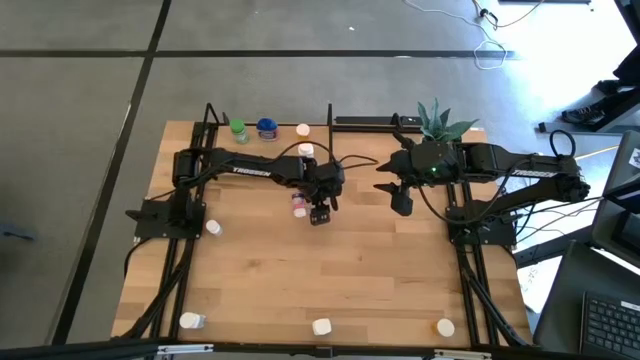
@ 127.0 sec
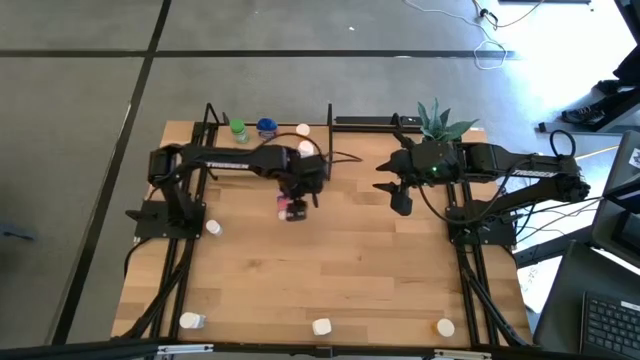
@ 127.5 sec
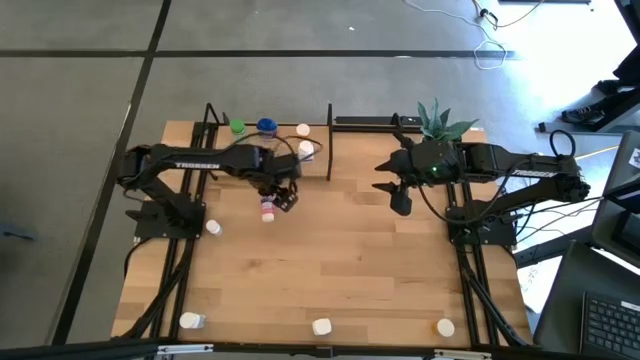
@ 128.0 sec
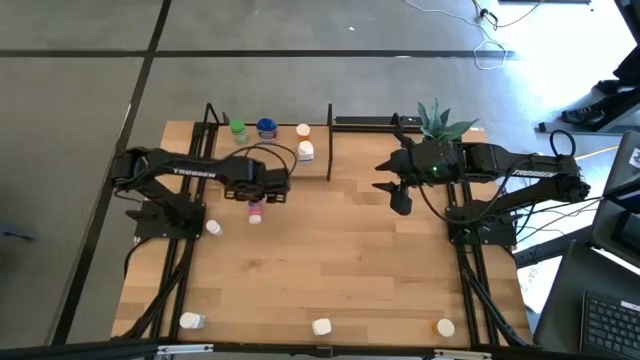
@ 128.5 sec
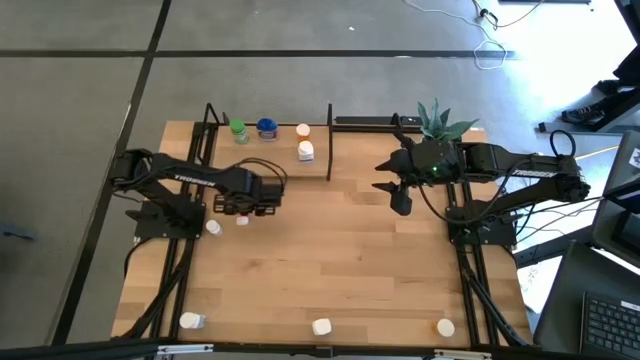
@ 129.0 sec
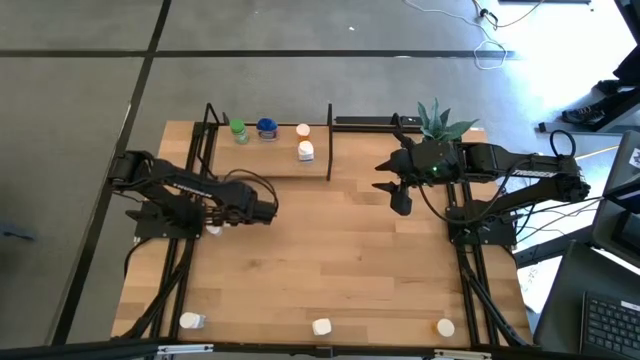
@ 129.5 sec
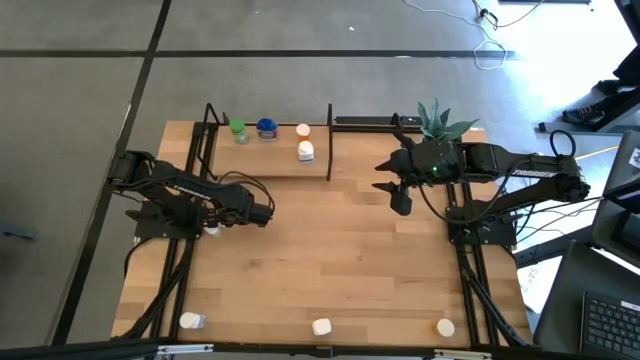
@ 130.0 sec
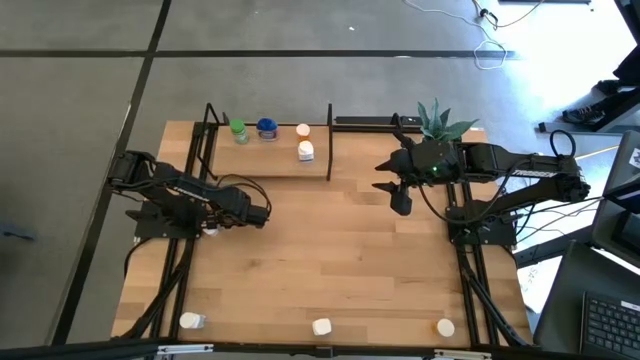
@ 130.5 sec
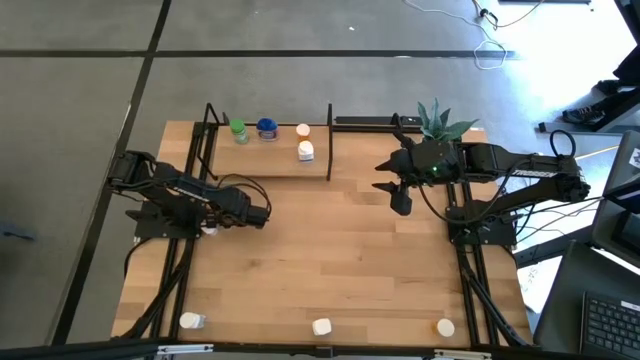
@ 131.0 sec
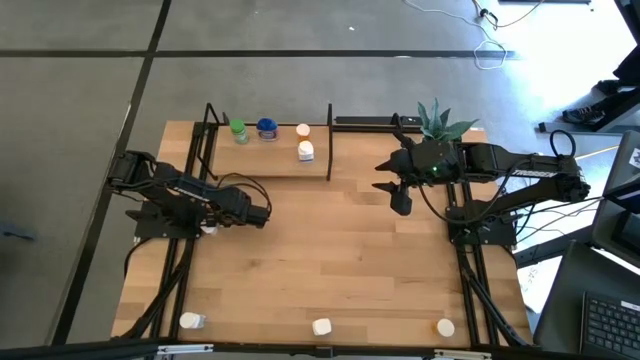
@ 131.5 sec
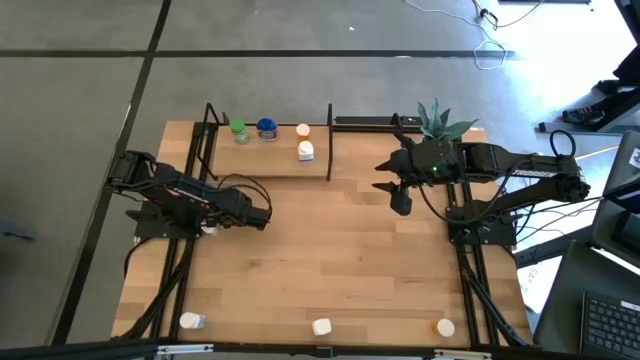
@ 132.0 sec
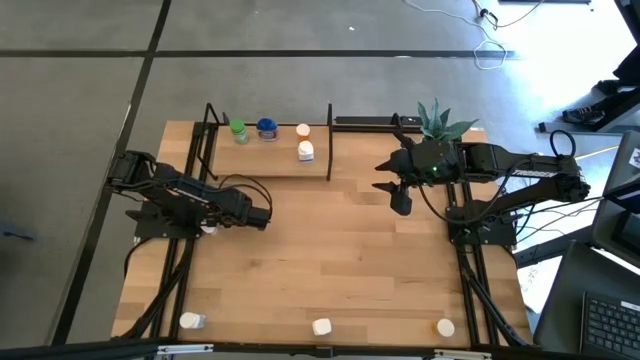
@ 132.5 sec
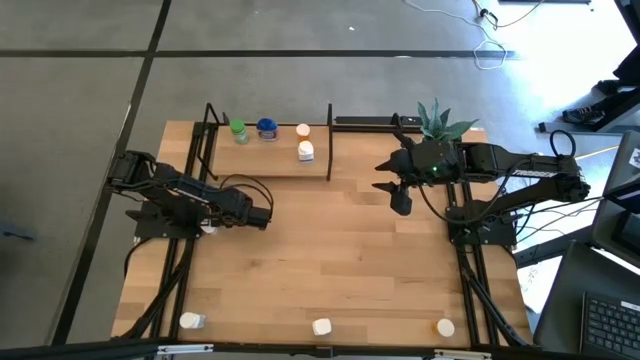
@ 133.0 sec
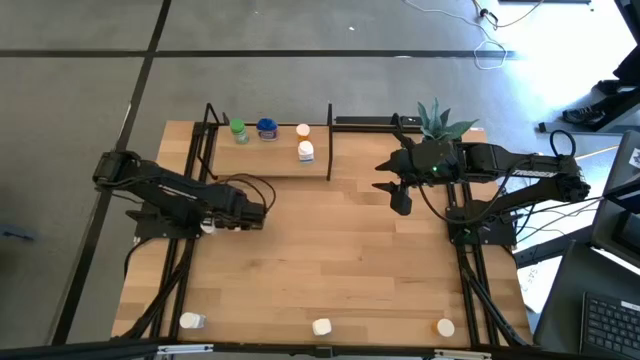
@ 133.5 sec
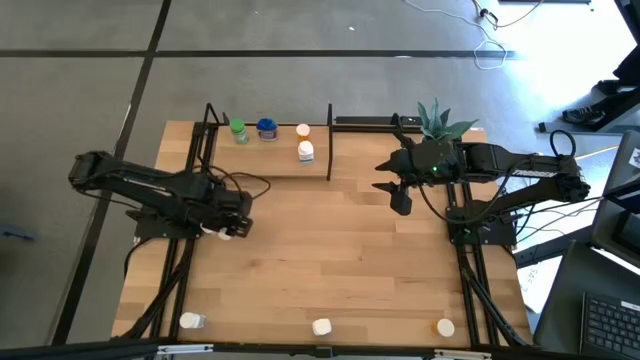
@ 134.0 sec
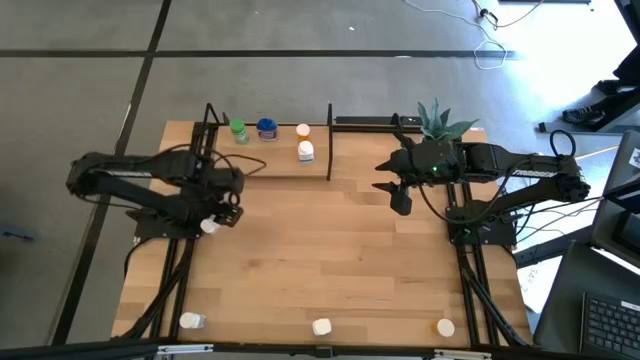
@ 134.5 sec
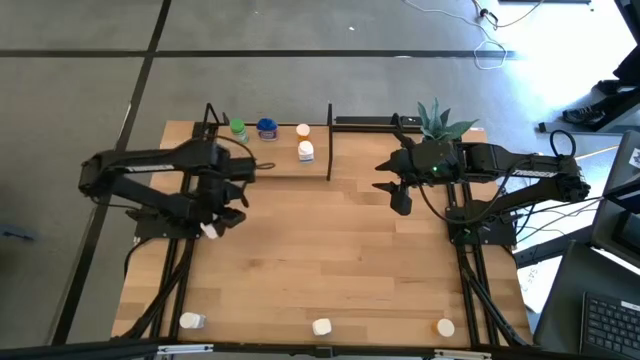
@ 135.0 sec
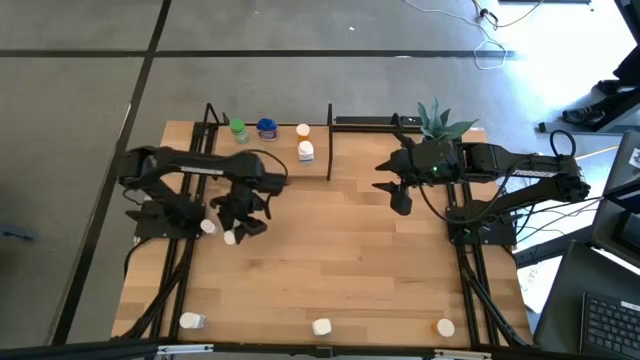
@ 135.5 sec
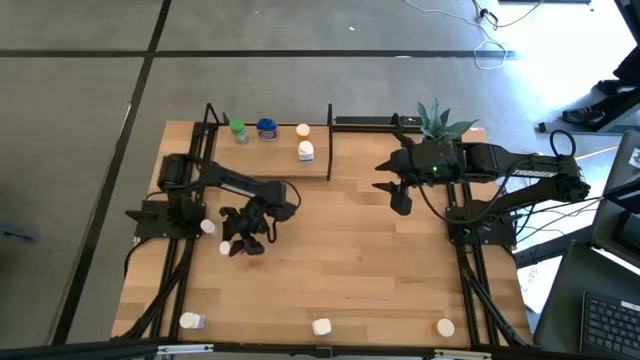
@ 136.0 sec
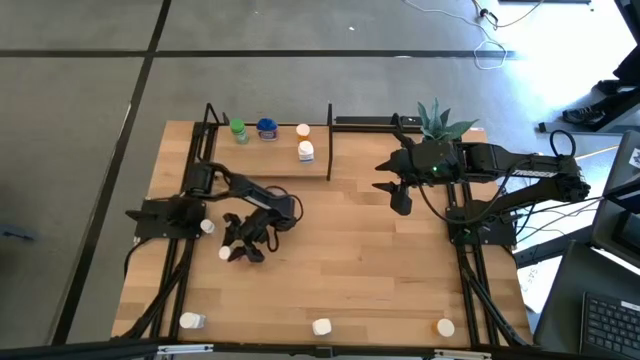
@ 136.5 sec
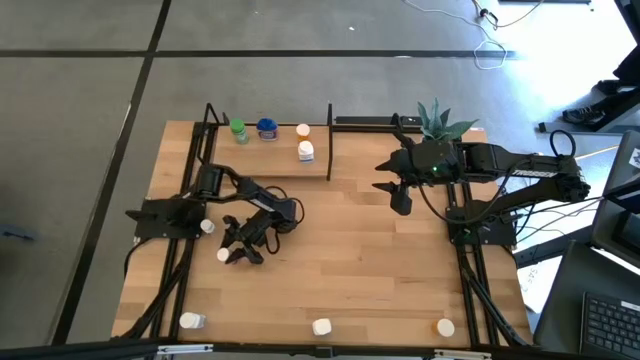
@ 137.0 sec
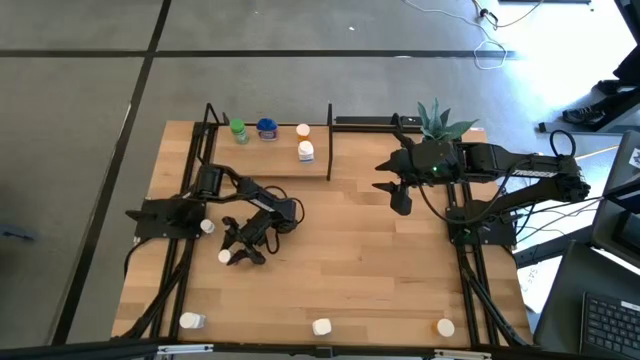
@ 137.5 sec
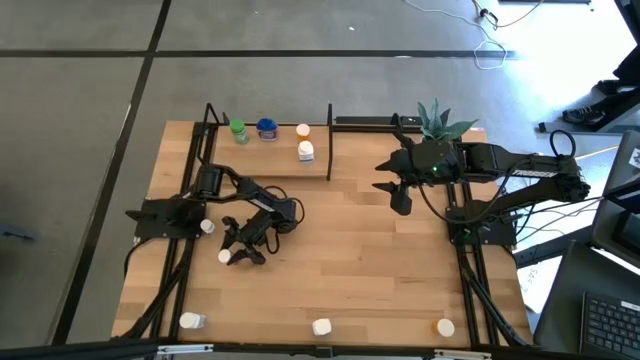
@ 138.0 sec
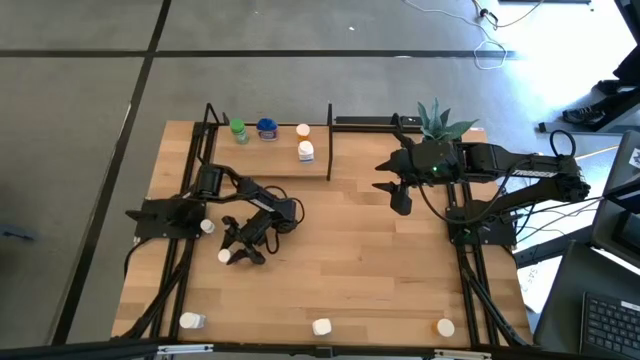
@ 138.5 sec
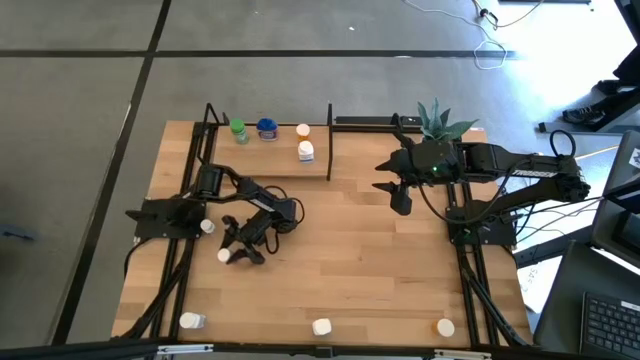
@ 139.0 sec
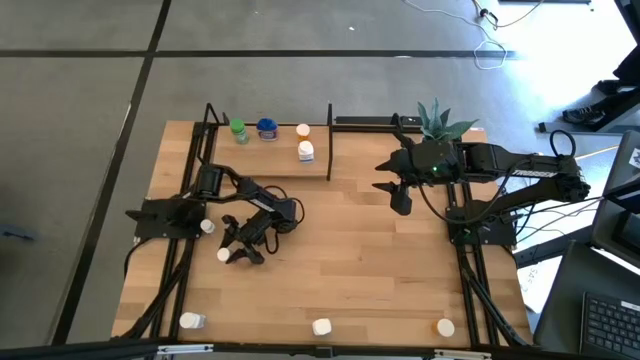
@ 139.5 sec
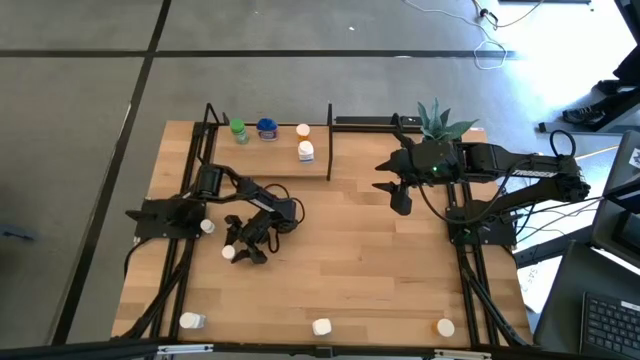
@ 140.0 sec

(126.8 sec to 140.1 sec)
Task: Pick and place medicine bottles onto shelf by color
Put the pink pill bottle on the shelf
